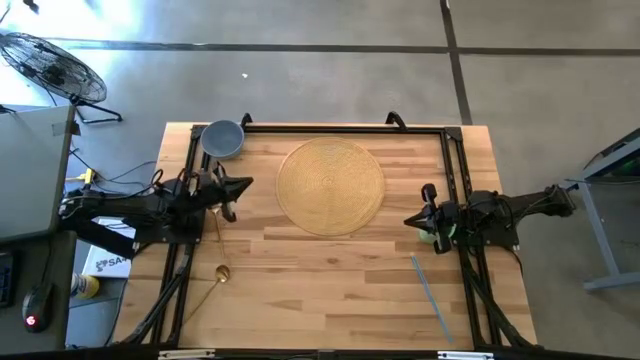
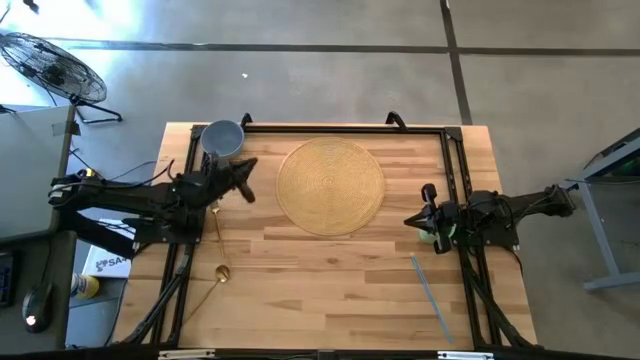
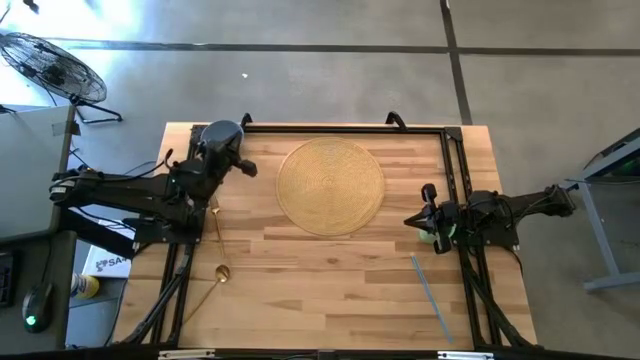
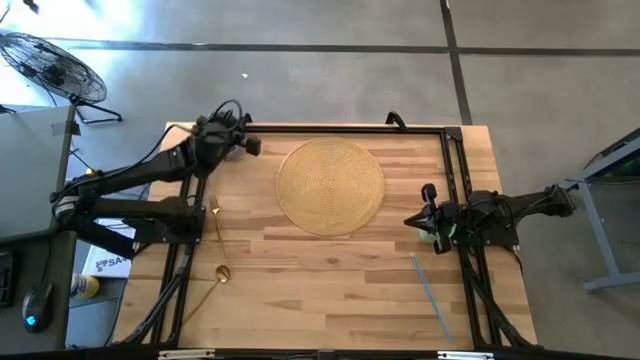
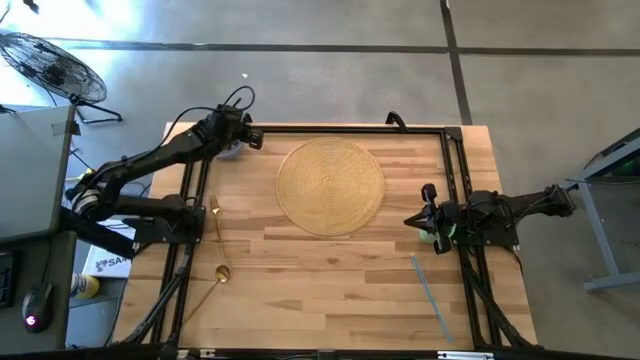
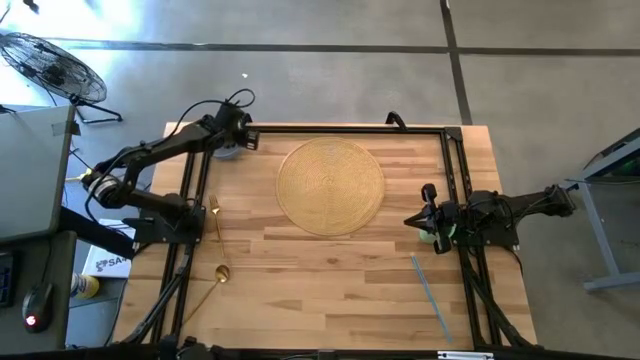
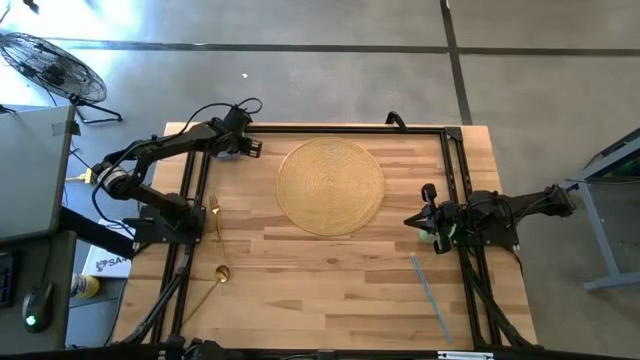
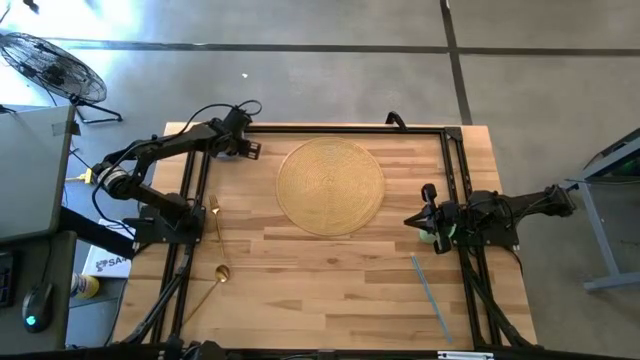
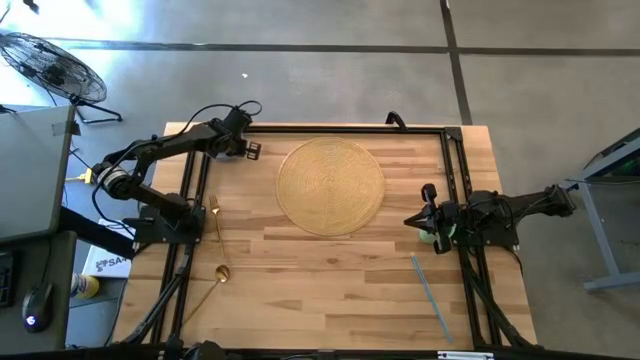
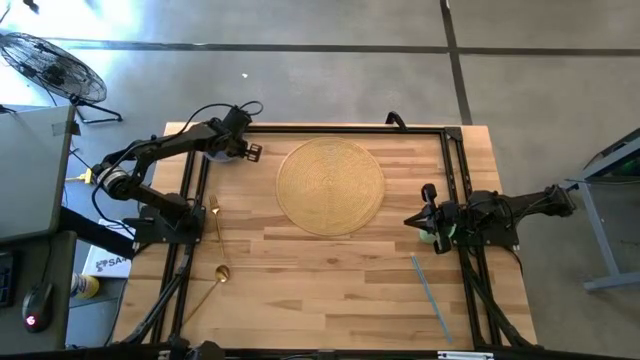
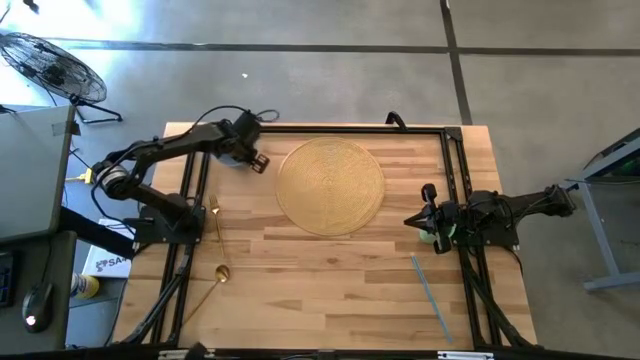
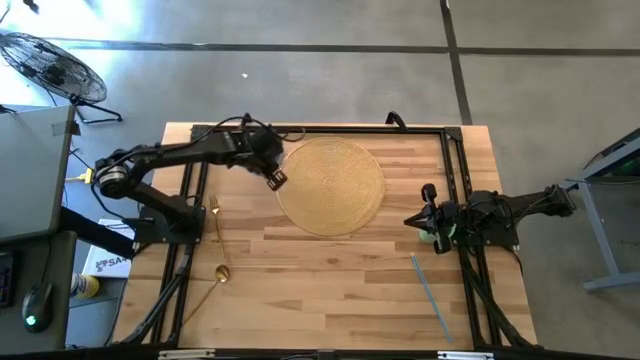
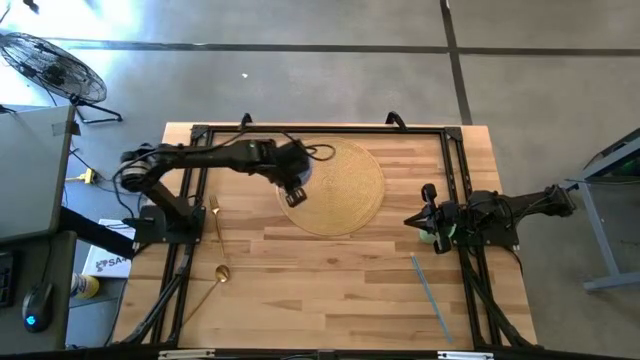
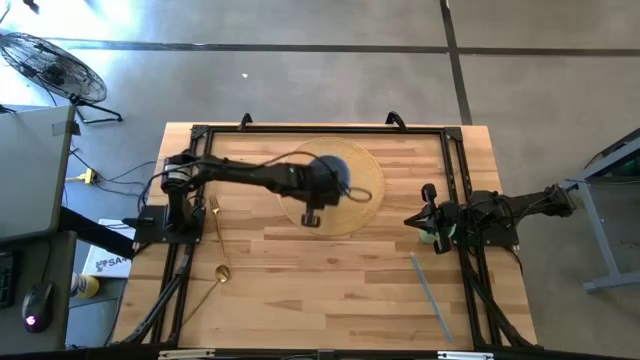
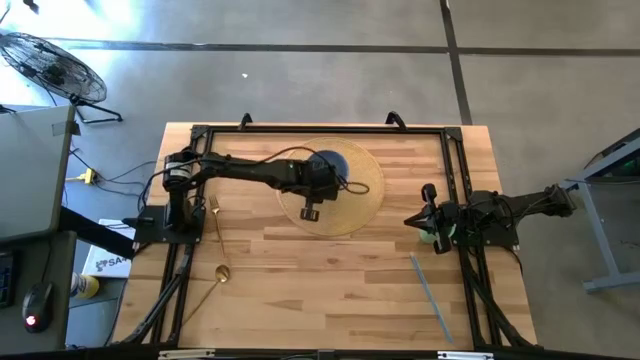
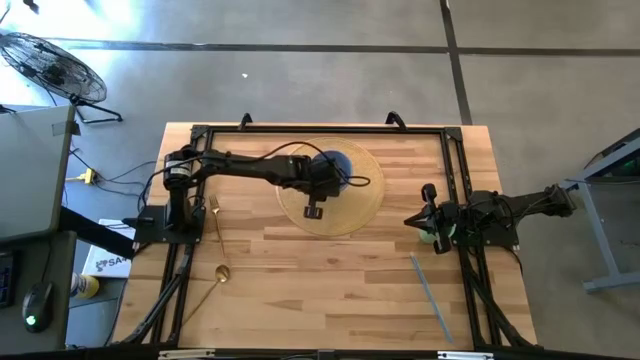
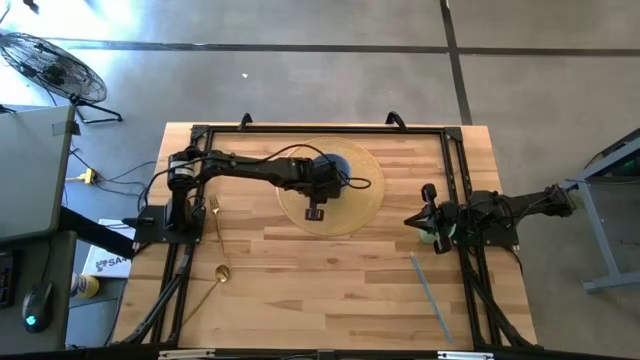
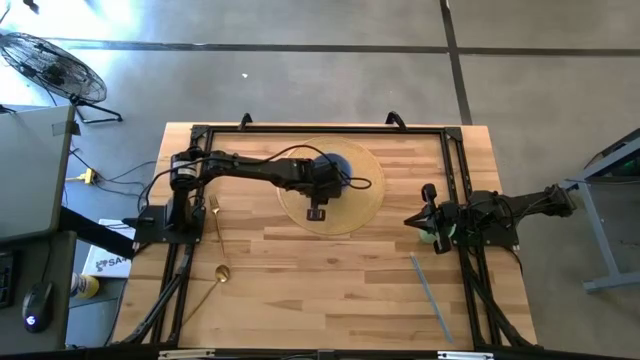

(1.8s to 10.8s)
Task: Pick & Place Utensil
Put the blue bowl on the brown mat

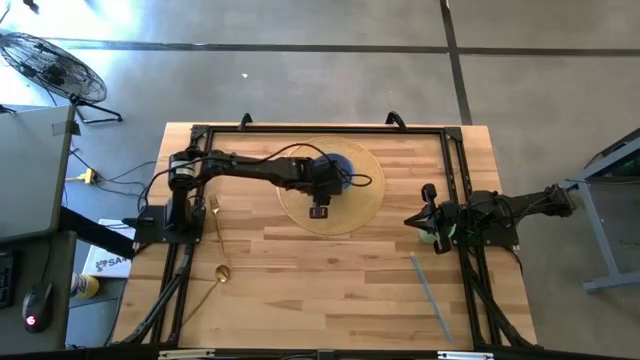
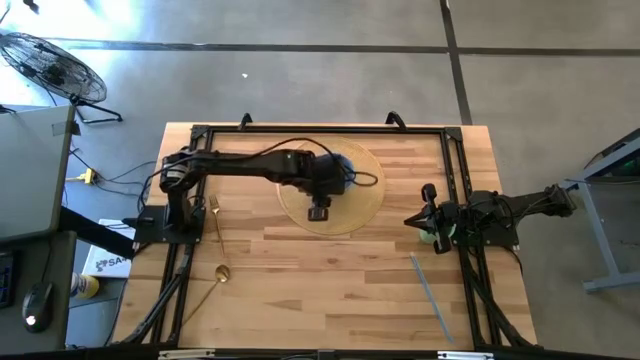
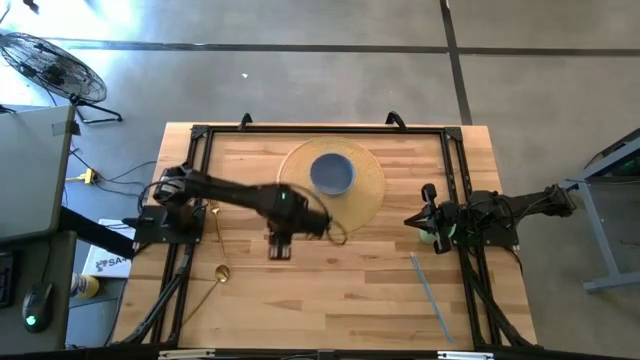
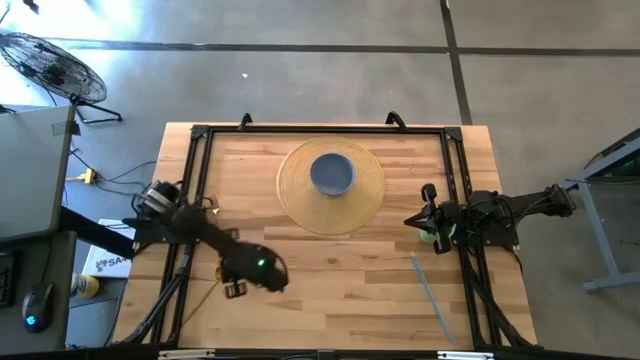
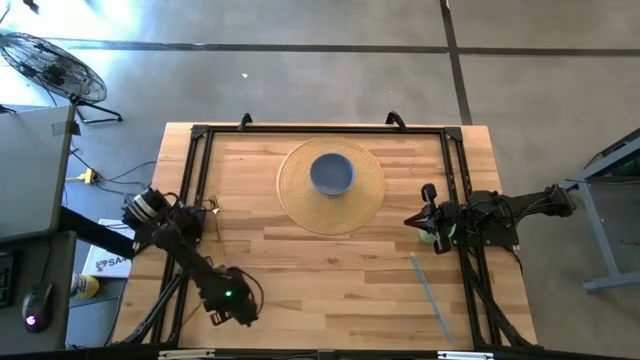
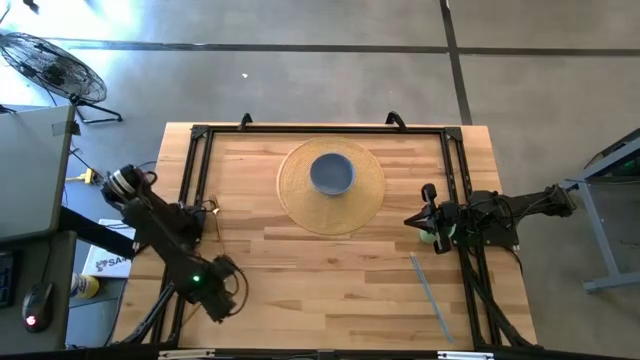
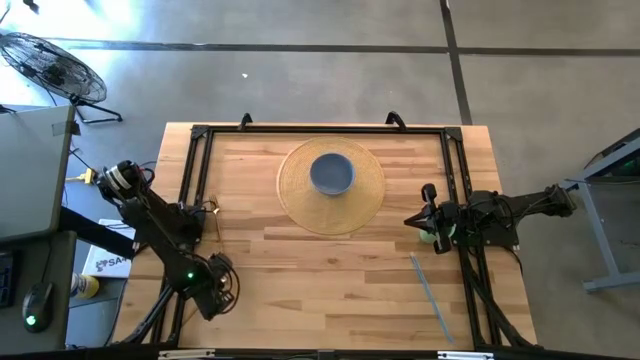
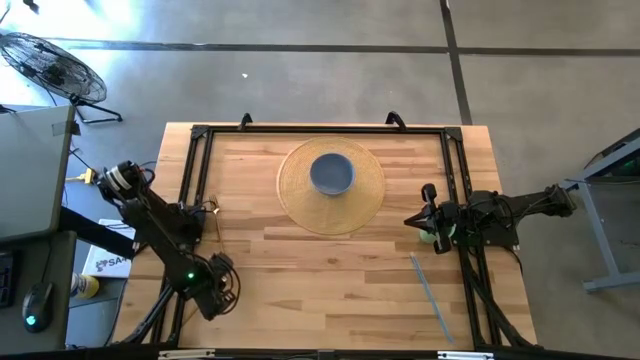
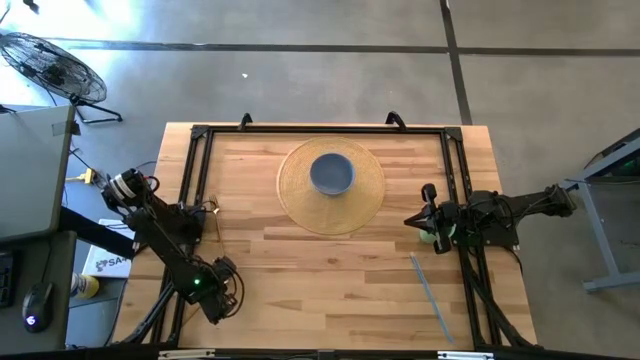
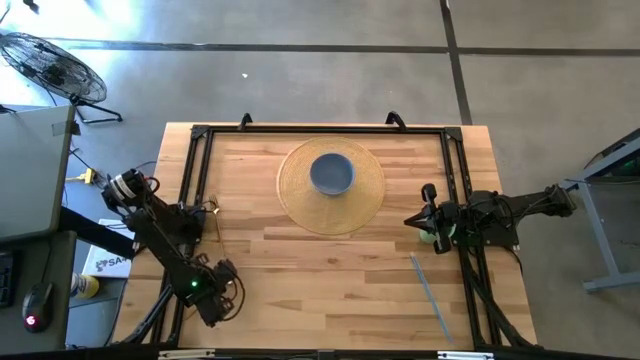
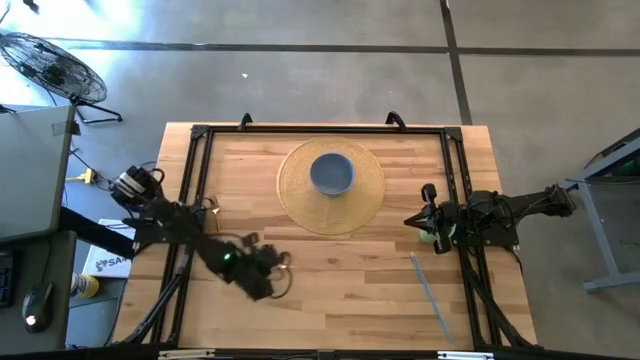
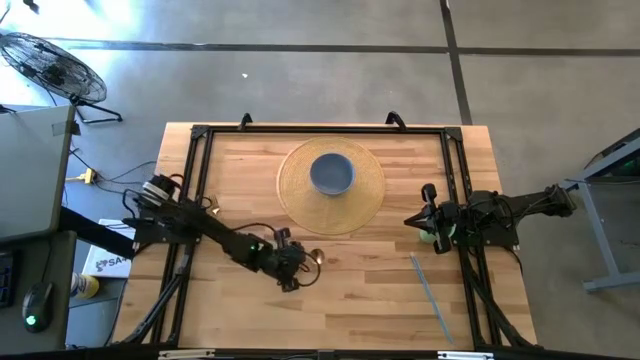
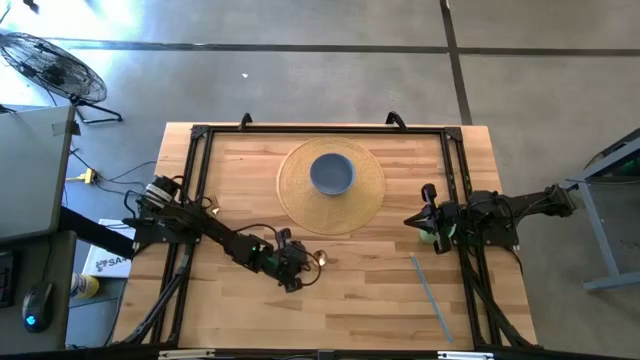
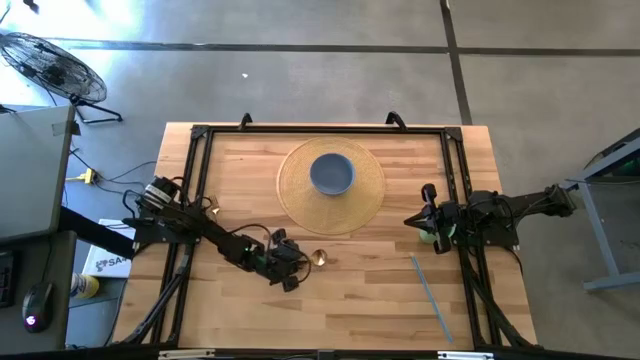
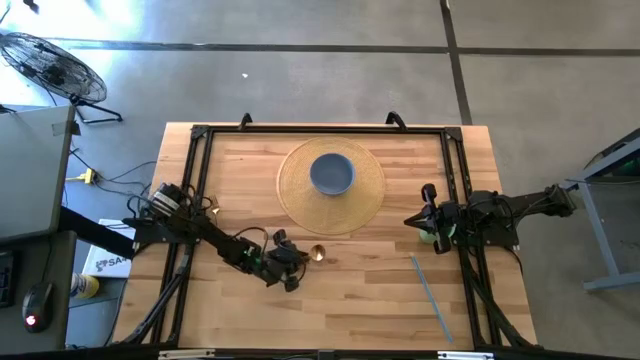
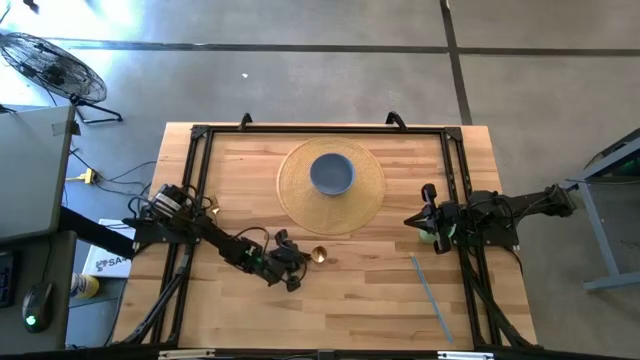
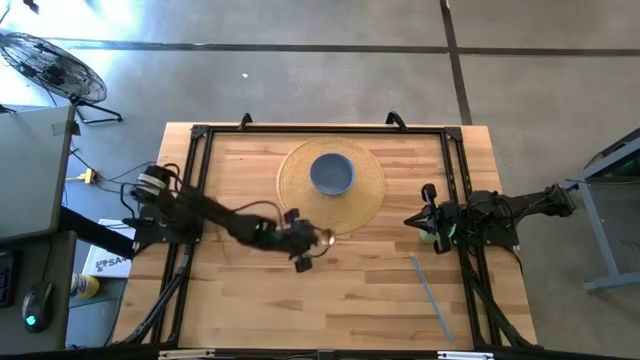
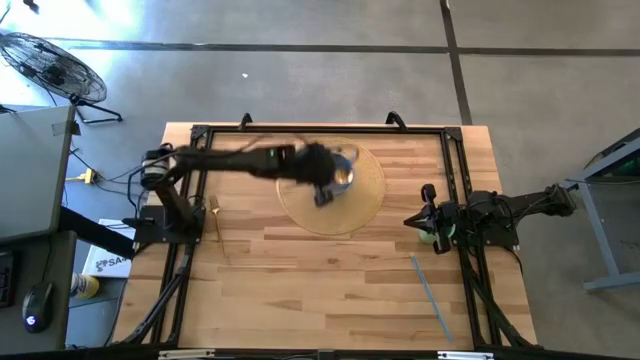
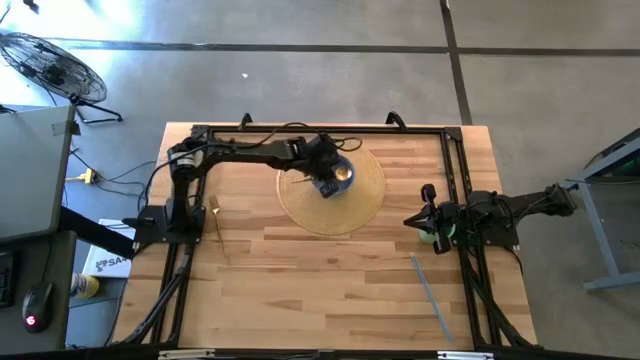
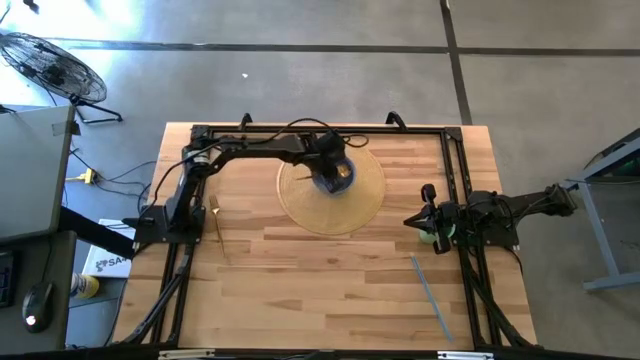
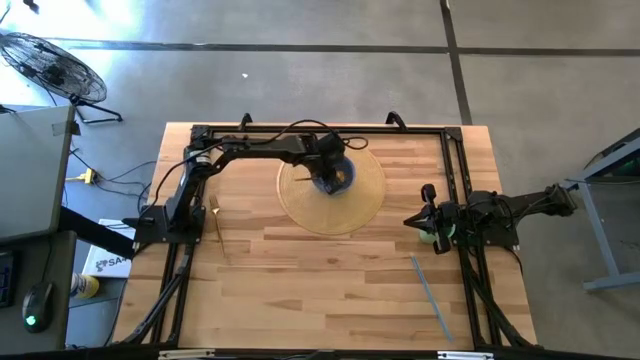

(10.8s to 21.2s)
Put the gold spoon into the blue bowl on the brown mat

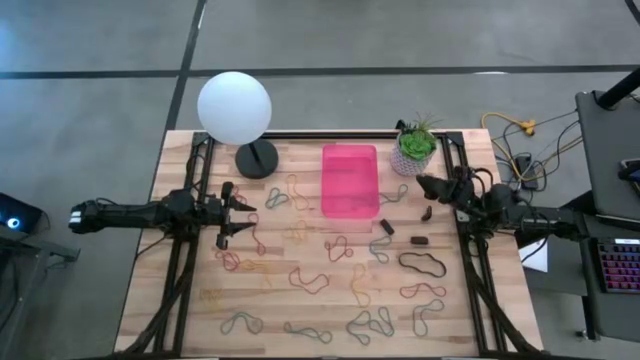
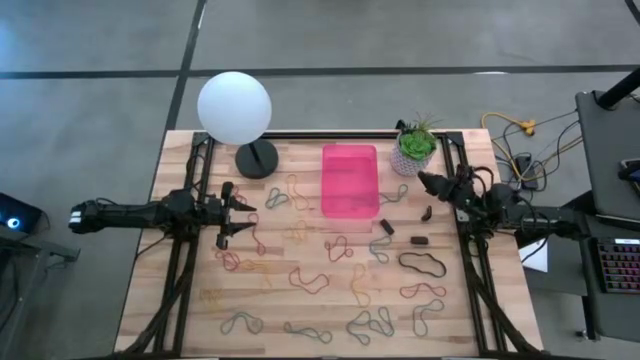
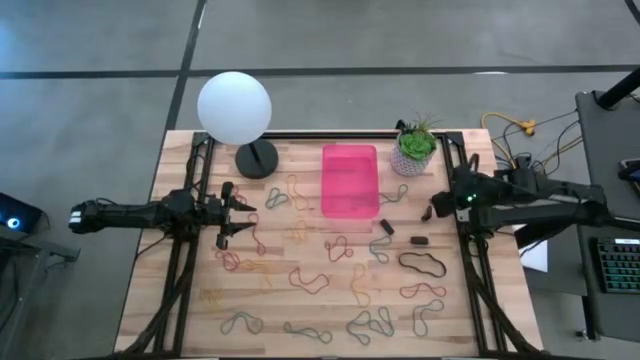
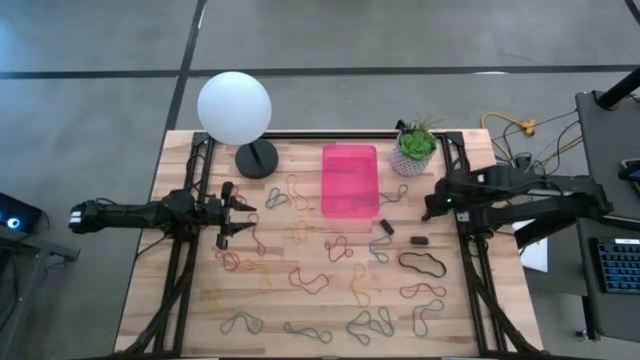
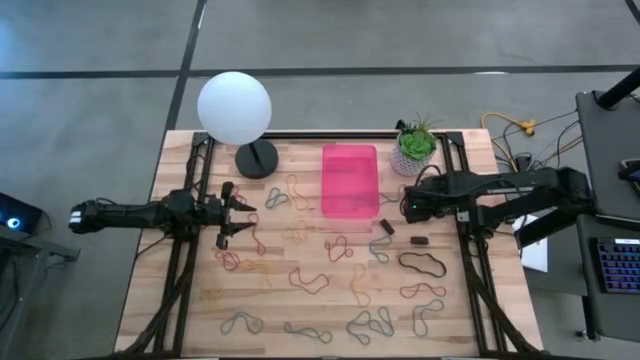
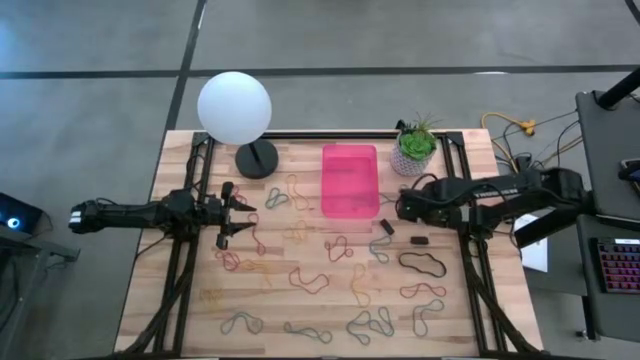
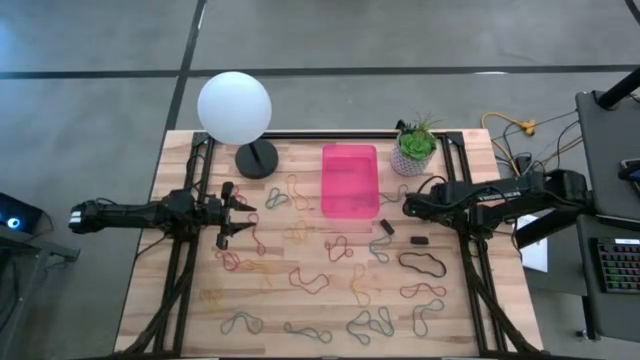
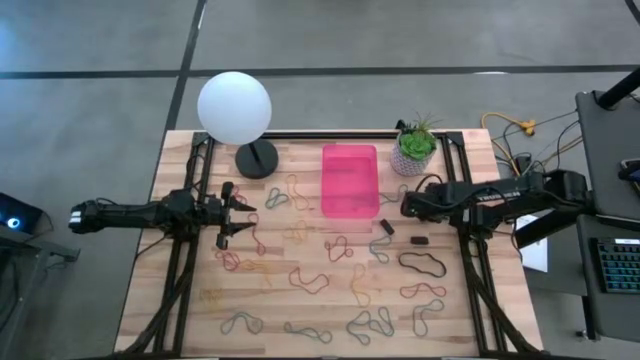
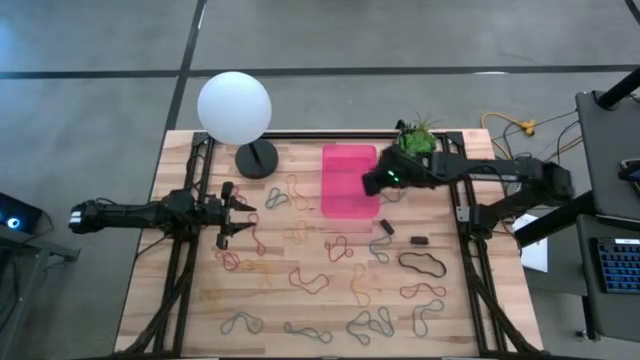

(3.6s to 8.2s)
Task: Pick and place rubber bands into bin
Put the black rubber band into the pink bin
